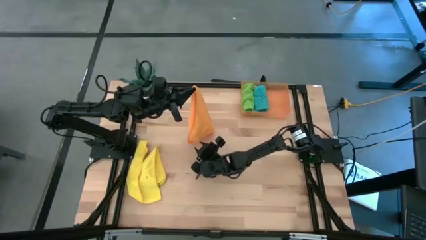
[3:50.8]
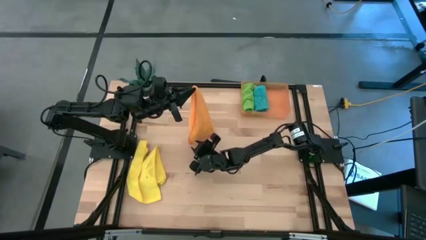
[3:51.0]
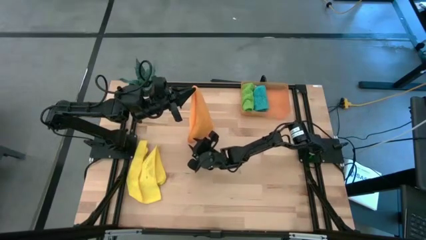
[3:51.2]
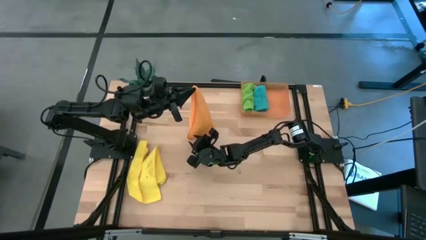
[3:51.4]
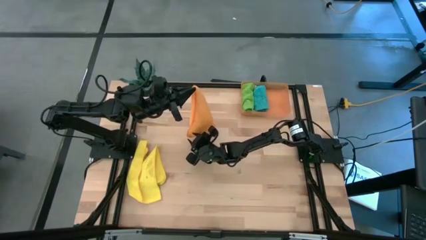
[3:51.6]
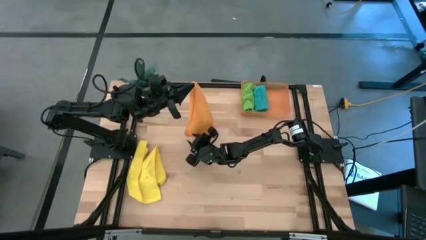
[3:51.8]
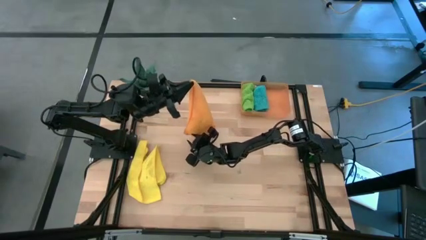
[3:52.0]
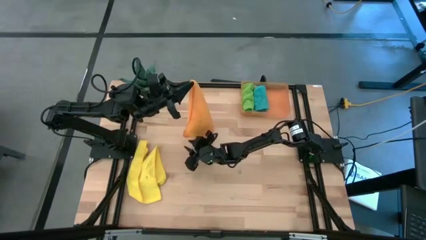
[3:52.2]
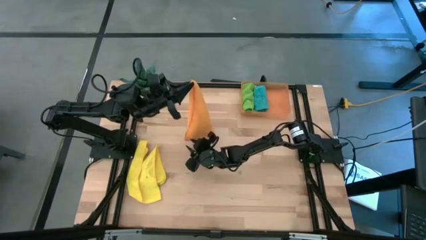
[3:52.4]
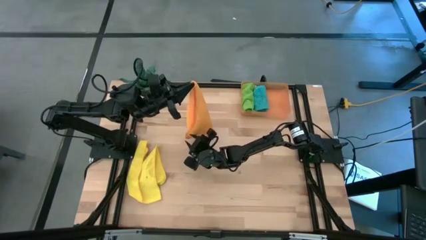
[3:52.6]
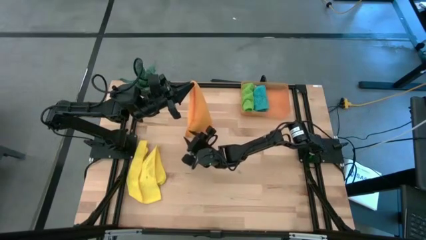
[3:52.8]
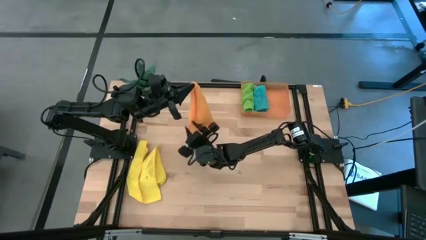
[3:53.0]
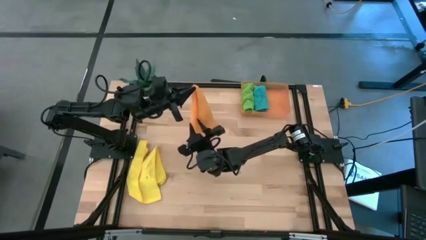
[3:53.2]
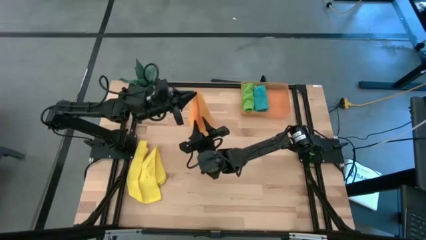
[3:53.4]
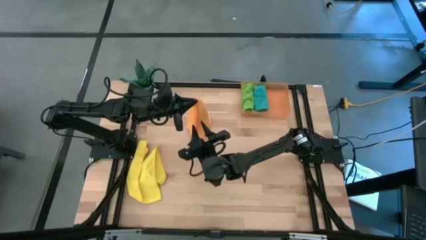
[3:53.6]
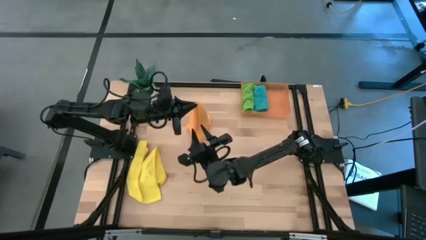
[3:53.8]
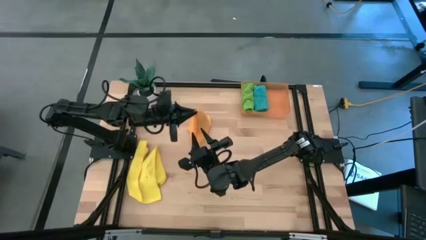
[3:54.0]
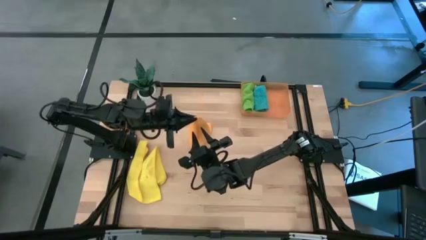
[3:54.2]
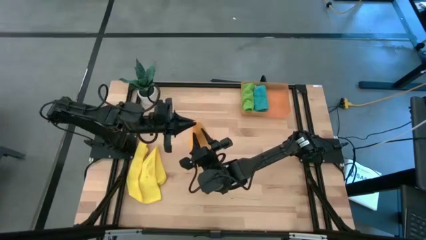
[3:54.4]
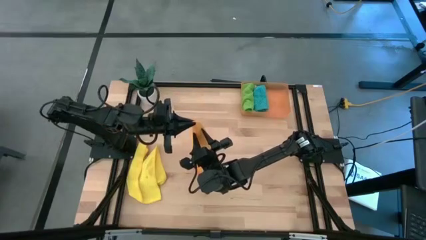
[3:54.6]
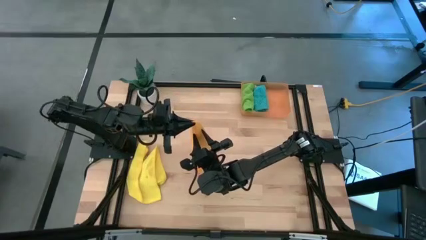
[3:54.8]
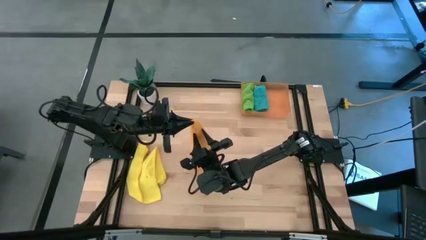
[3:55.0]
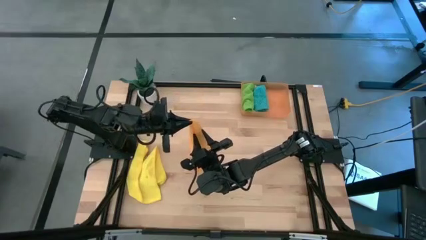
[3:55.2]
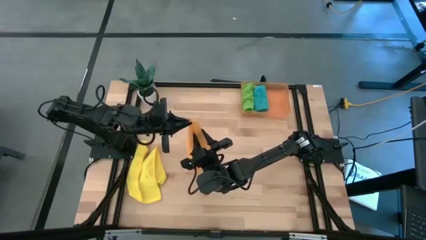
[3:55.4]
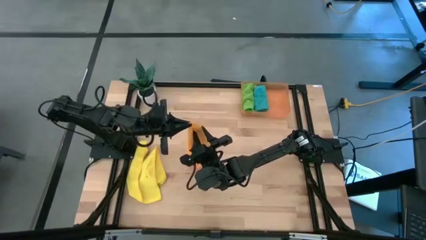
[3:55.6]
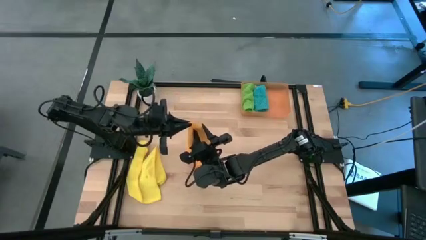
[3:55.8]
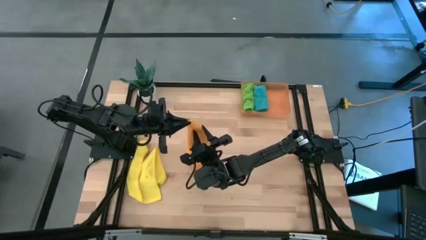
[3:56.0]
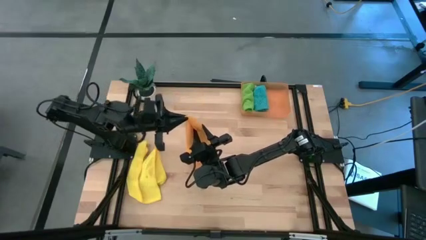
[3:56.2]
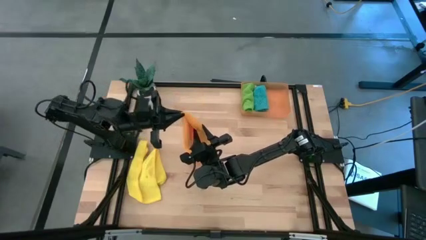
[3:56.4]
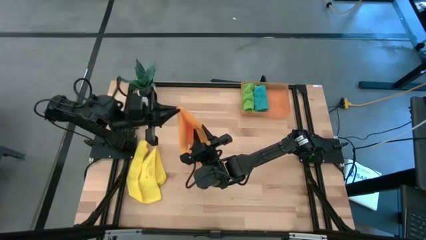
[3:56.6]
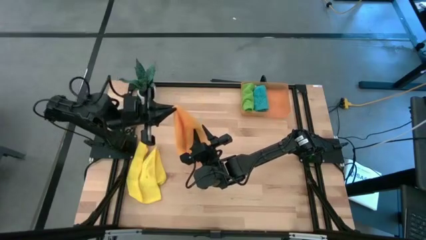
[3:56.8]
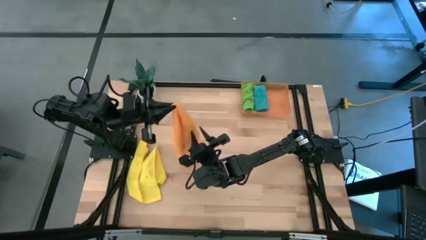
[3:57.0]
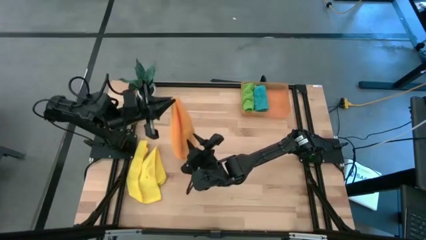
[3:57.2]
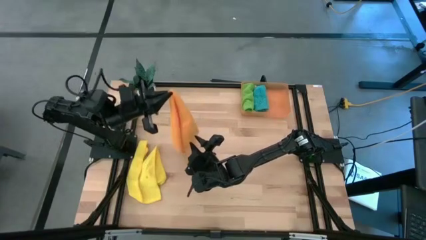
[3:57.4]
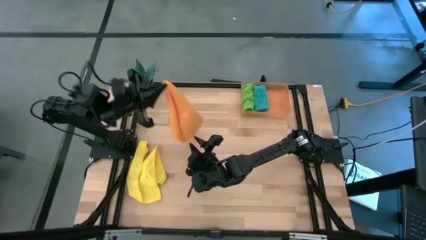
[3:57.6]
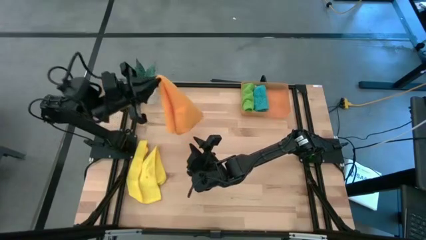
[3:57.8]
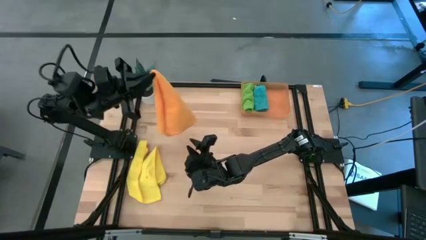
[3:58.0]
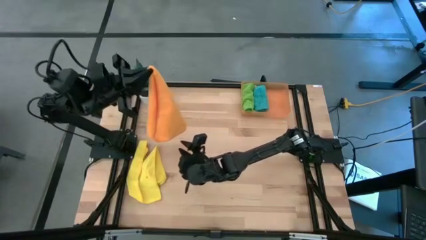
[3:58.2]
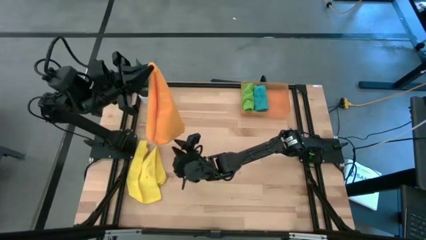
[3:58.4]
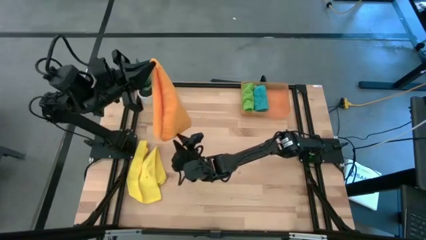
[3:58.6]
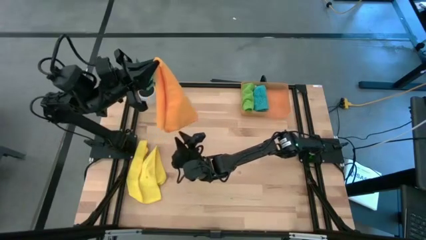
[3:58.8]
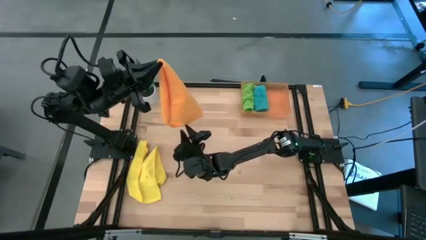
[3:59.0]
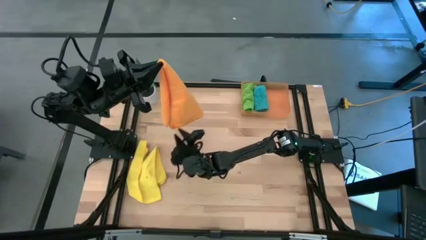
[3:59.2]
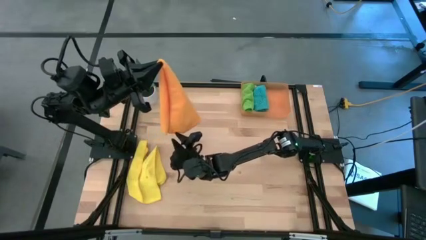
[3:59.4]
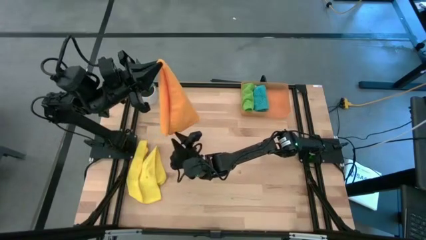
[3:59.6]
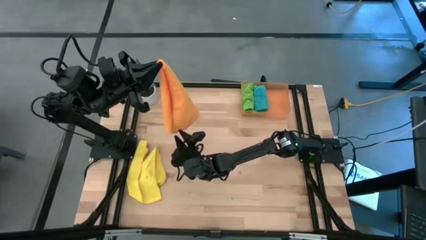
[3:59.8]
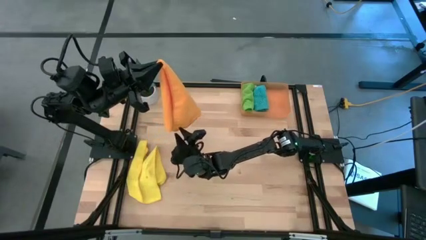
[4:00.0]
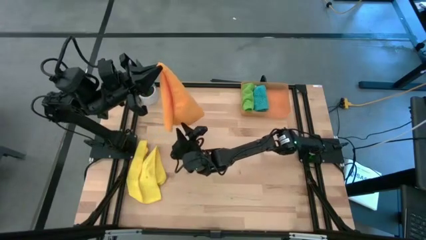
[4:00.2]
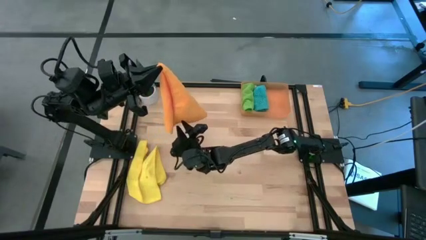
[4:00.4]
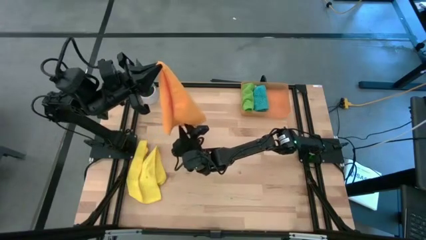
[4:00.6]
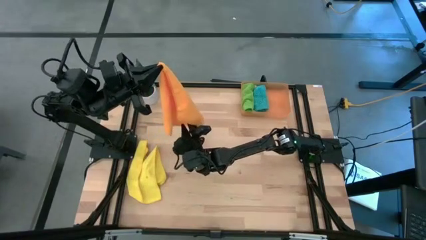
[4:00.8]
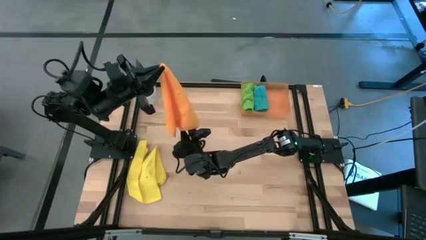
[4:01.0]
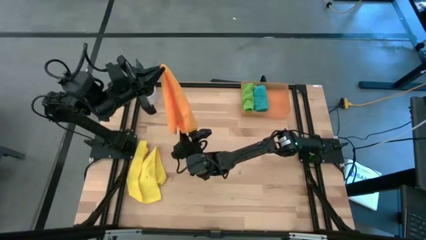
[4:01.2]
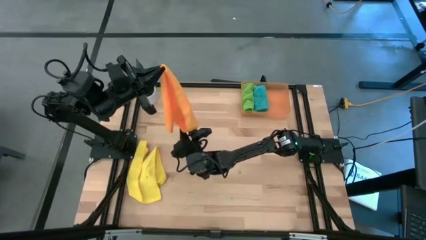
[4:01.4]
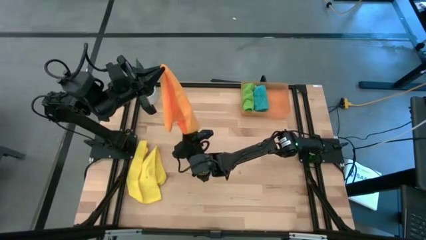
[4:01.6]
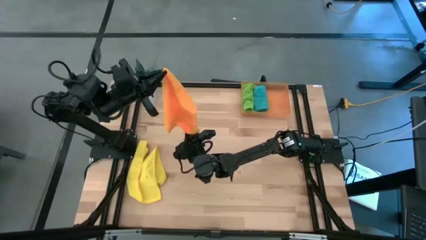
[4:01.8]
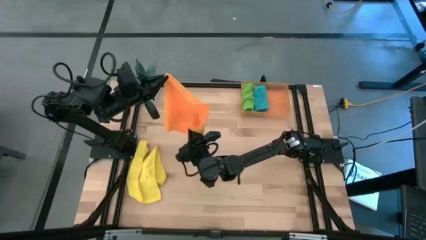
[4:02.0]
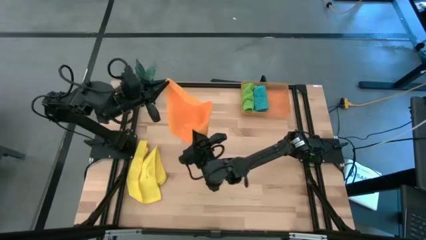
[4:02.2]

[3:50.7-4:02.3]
Task: Roll microfiber towels into tight, uniform cylinder then place into a basket
Fold the orange towel
